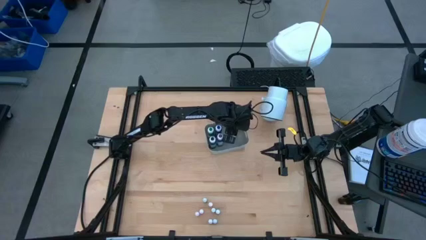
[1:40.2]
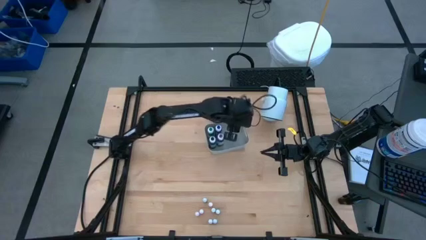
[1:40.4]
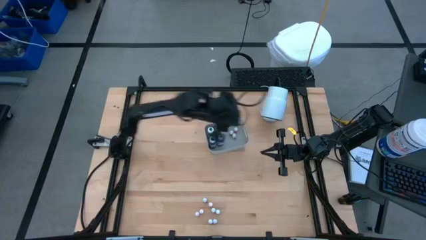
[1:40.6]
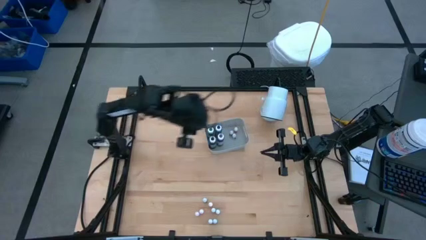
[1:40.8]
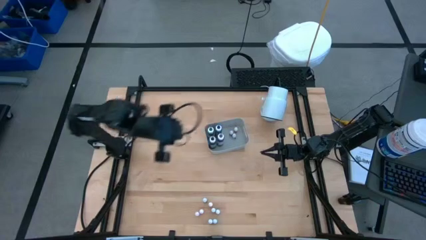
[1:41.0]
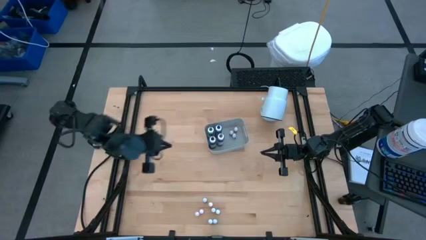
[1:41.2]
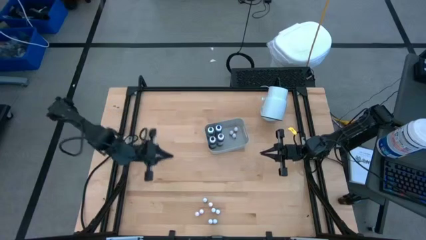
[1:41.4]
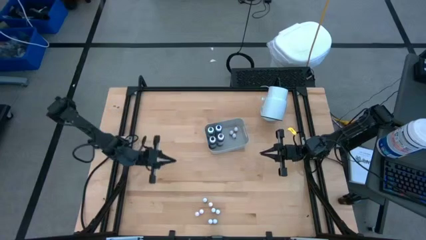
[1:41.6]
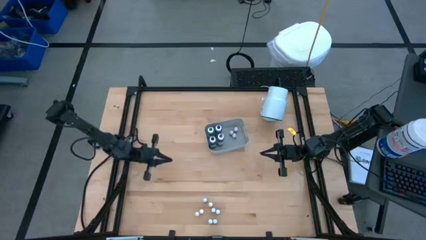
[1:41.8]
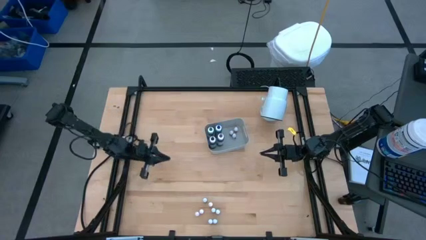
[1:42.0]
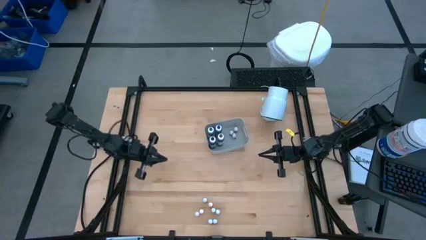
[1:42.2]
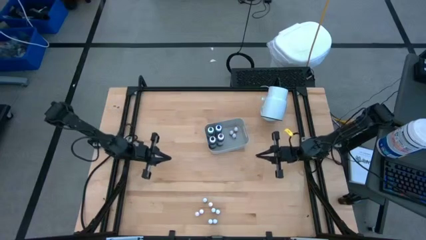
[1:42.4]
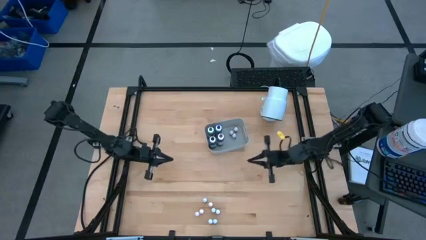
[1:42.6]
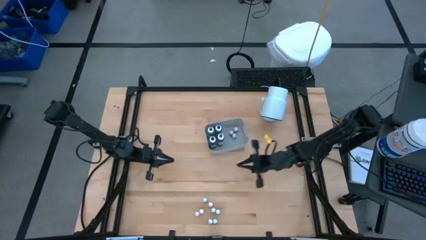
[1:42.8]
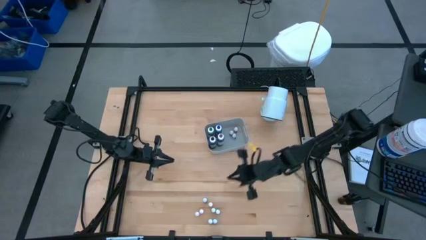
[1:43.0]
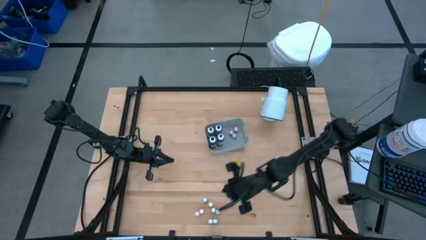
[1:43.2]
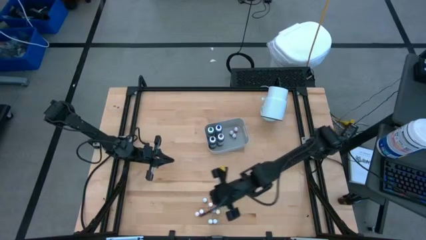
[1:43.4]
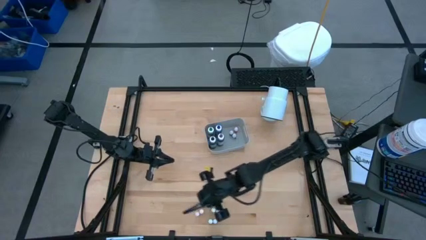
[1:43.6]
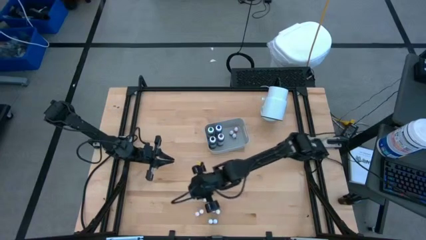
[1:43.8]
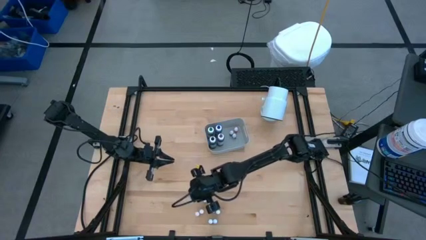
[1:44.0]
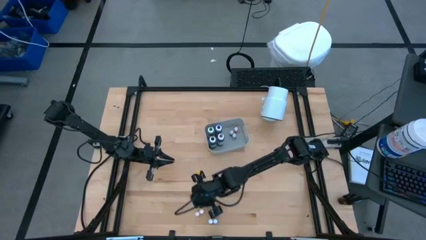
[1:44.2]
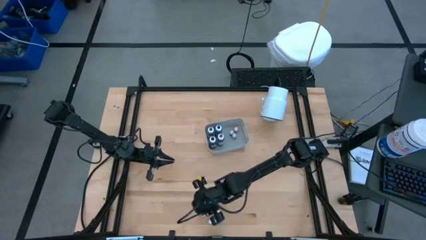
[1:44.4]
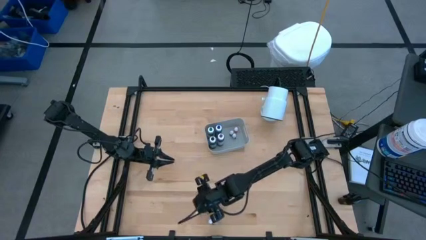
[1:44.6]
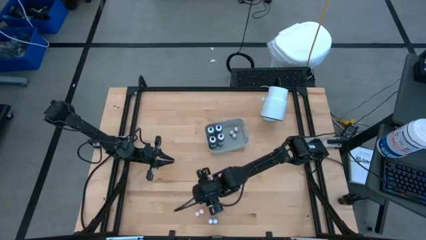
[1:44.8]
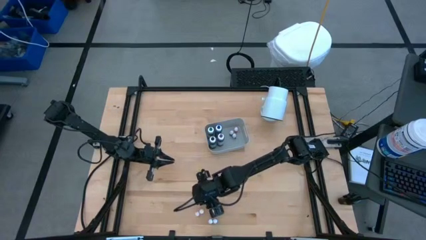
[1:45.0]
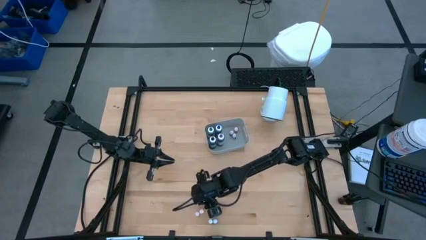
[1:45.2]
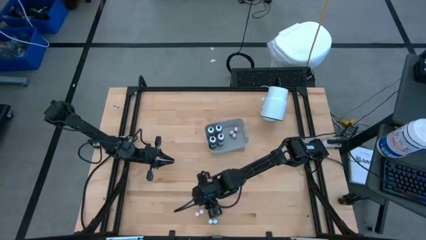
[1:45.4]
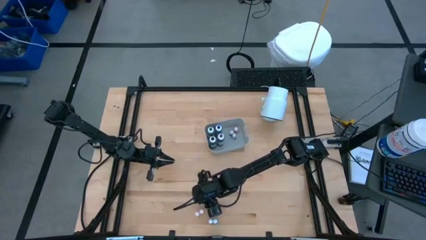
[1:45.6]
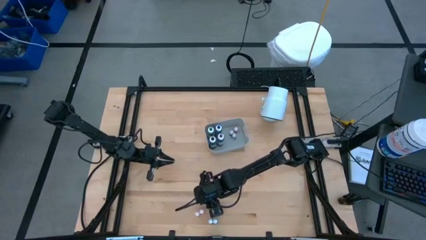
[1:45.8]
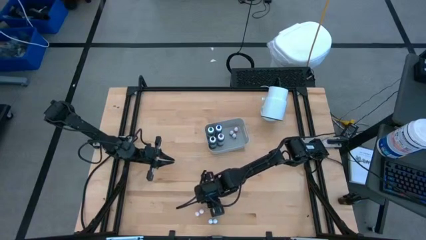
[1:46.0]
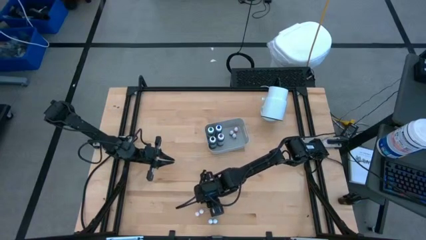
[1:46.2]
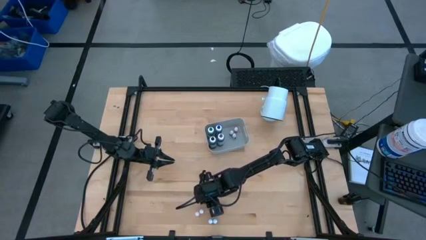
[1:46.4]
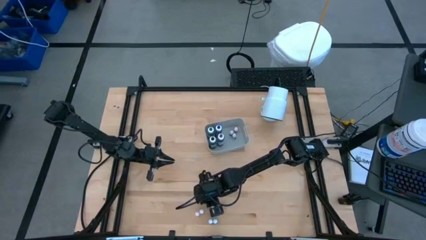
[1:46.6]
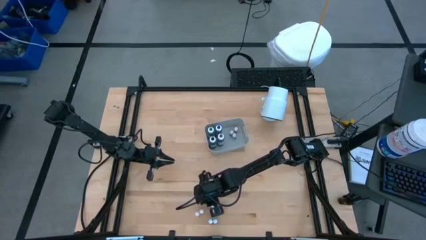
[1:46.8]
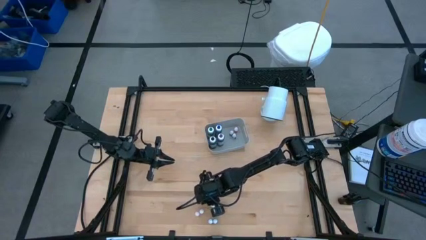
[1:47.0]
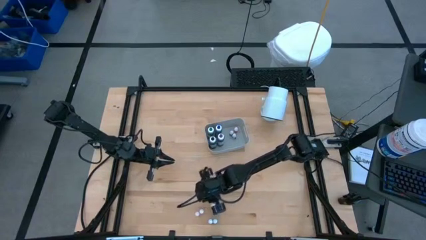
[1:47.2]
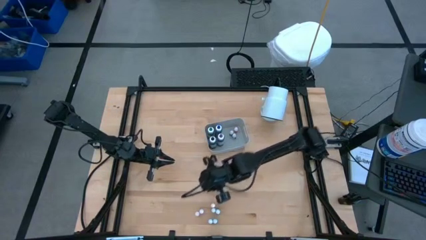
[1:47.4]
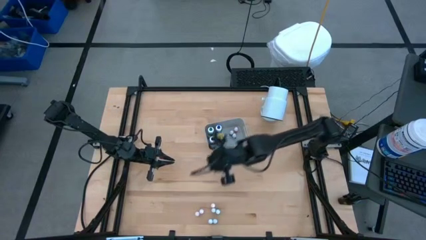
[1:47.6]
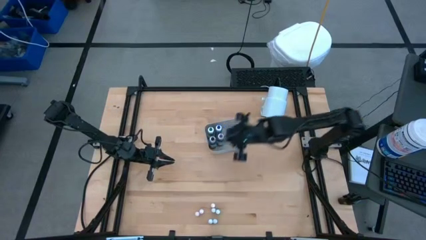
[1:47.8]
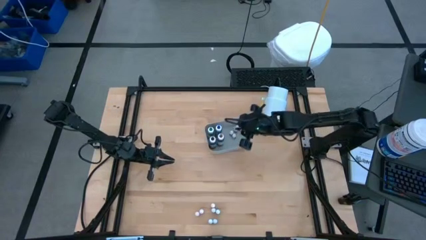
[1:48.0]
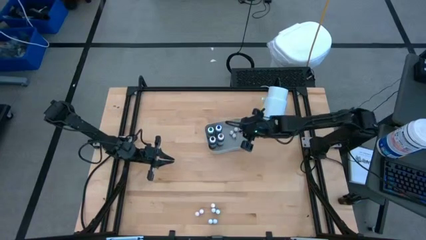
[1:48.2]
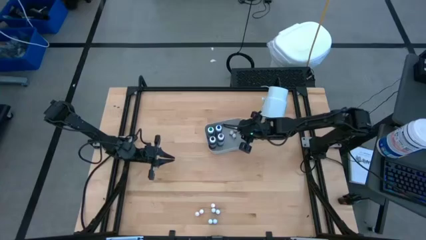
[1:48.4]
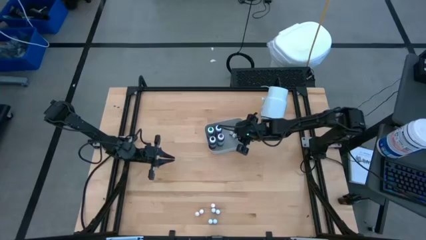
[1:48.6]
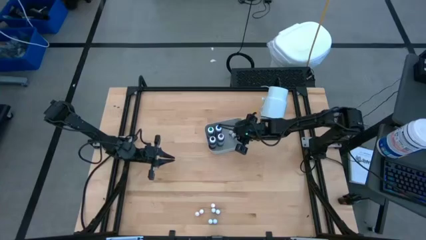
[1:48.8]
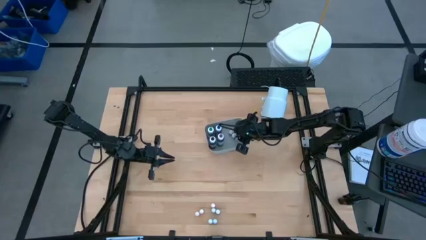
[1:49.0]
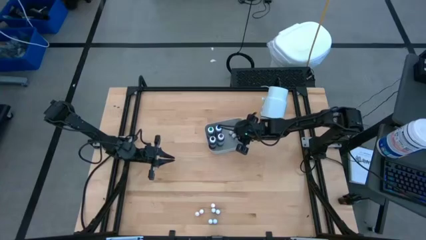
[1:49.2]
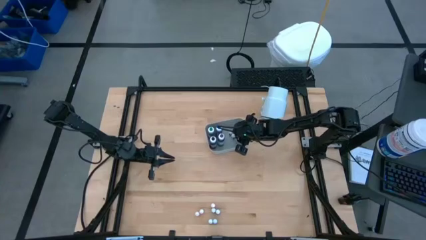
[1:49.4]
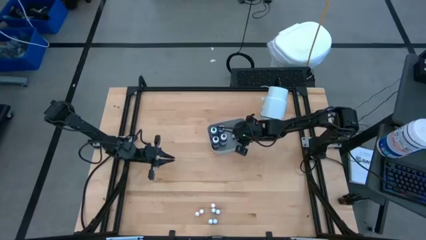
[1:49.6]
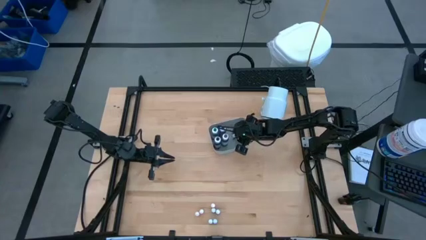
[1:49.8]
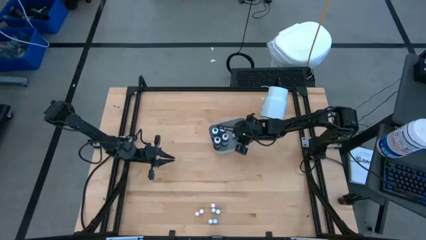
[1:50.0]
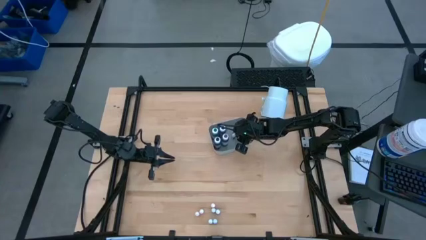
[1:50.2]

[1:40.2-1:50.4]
Task: Pick & Place food coloring
Put the small green food coloring bottle into the gray bin

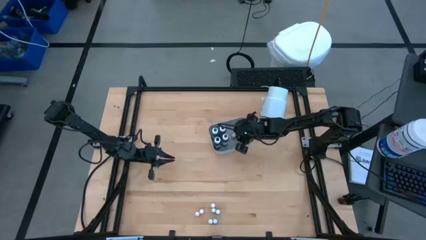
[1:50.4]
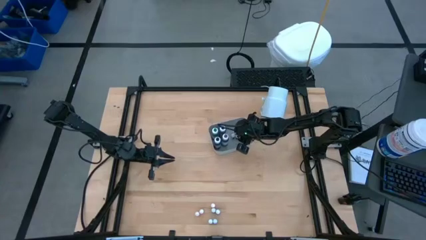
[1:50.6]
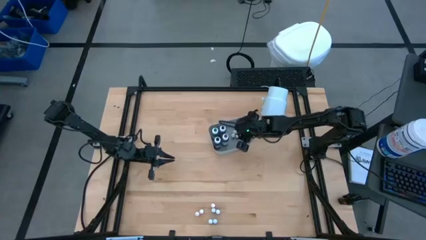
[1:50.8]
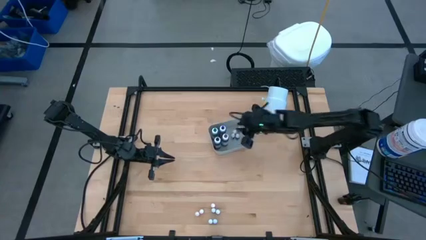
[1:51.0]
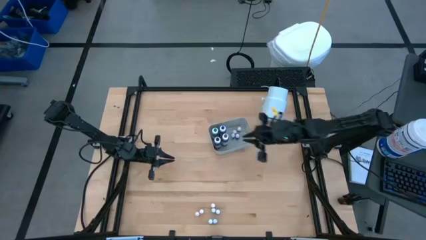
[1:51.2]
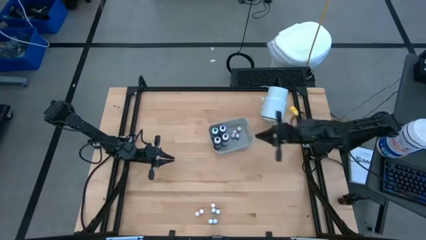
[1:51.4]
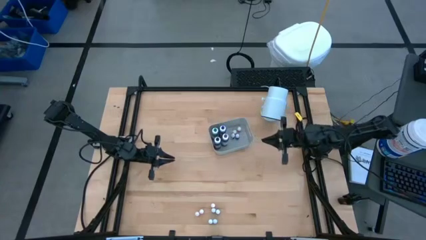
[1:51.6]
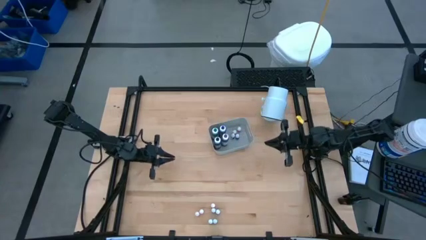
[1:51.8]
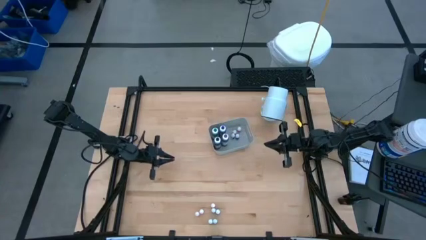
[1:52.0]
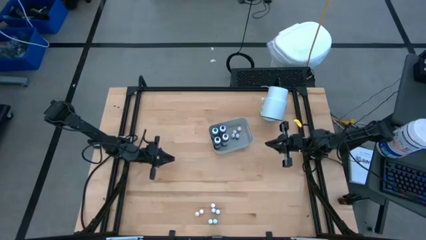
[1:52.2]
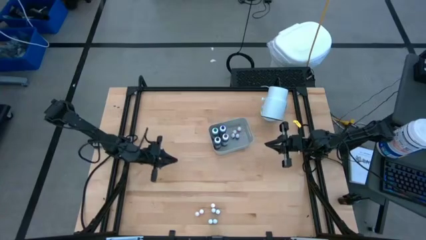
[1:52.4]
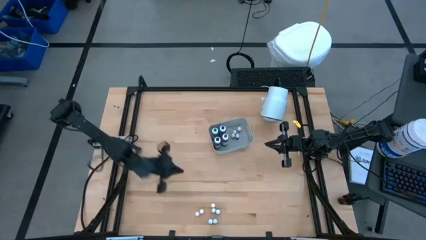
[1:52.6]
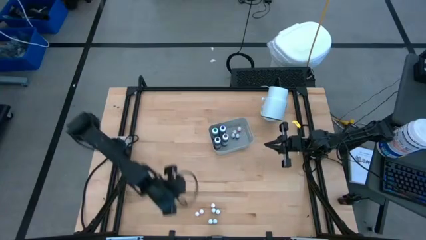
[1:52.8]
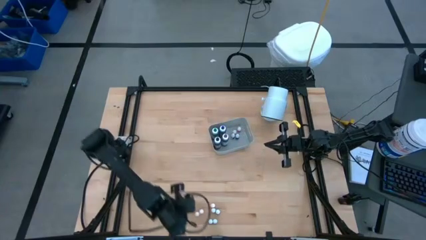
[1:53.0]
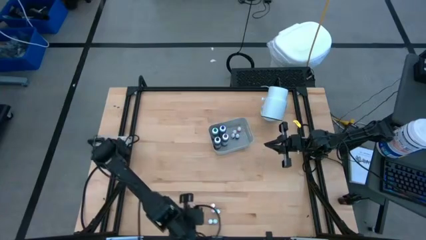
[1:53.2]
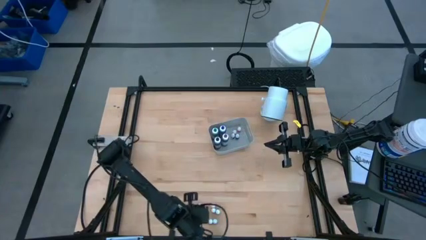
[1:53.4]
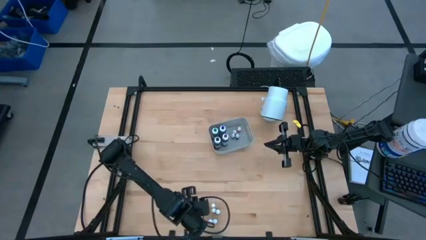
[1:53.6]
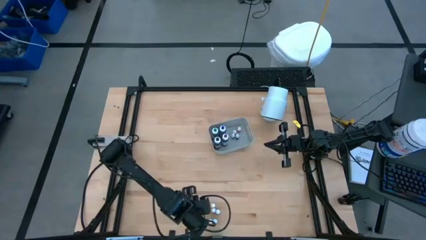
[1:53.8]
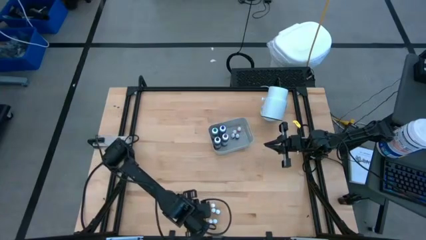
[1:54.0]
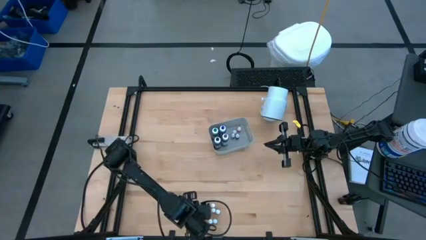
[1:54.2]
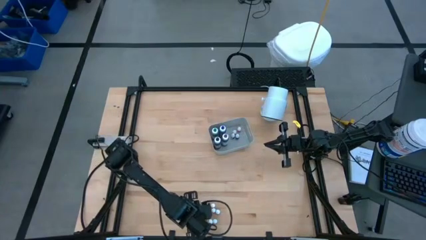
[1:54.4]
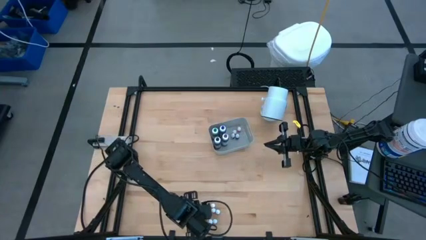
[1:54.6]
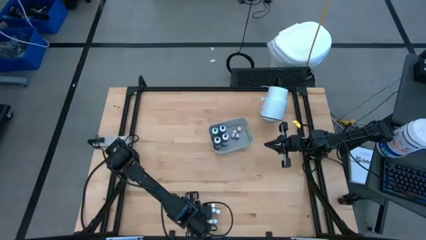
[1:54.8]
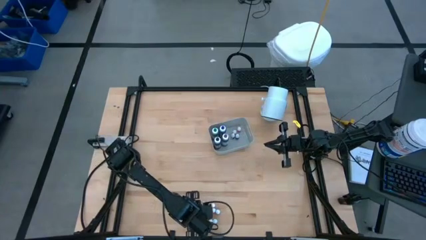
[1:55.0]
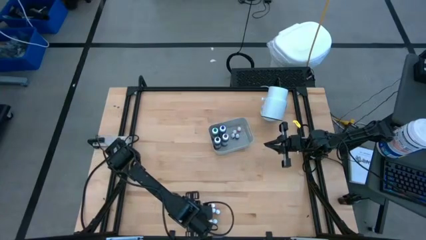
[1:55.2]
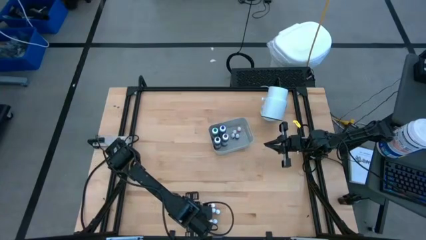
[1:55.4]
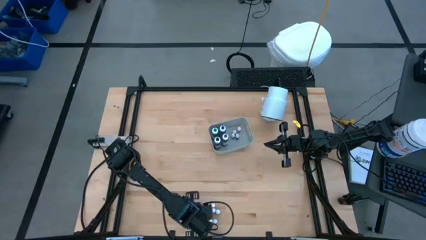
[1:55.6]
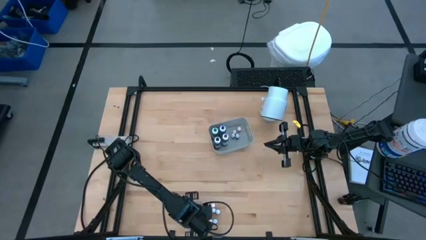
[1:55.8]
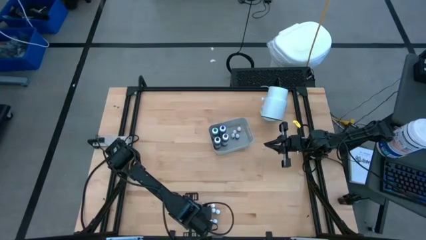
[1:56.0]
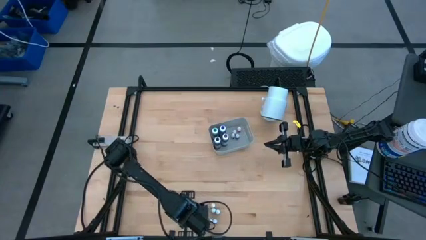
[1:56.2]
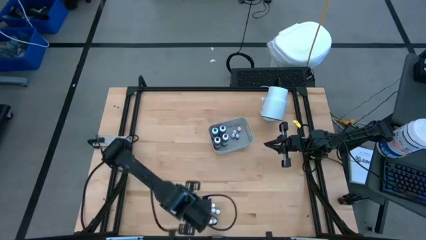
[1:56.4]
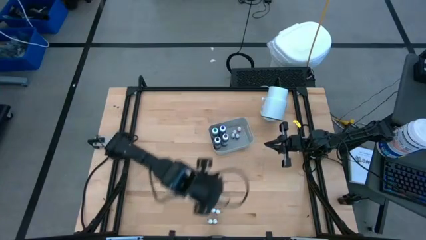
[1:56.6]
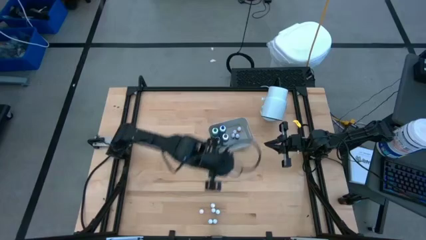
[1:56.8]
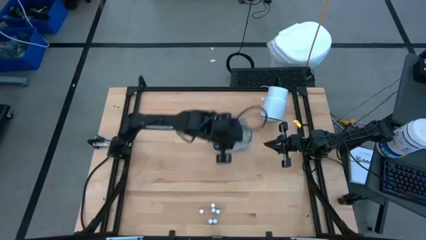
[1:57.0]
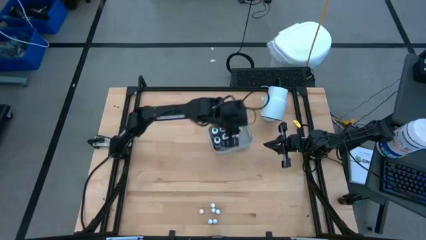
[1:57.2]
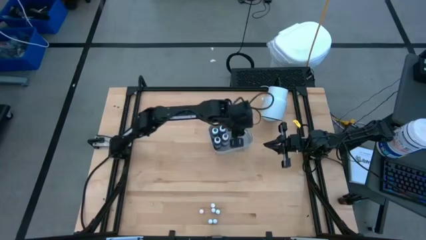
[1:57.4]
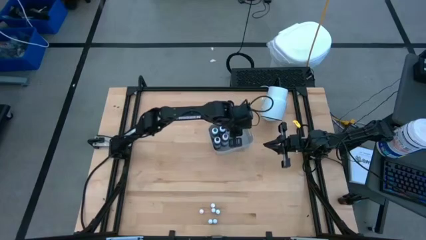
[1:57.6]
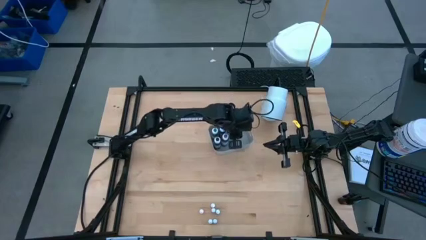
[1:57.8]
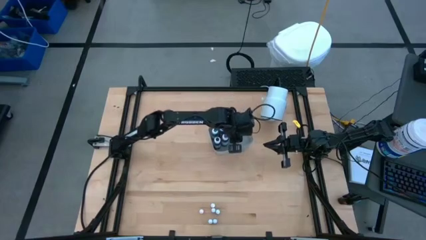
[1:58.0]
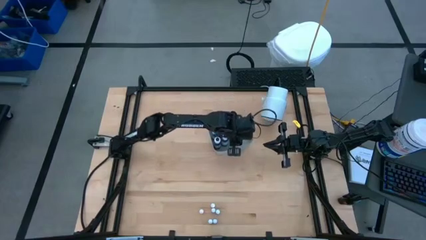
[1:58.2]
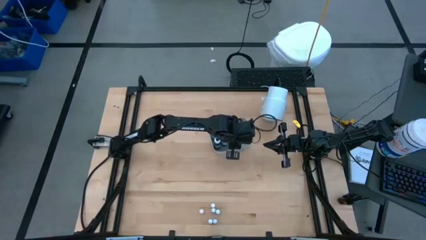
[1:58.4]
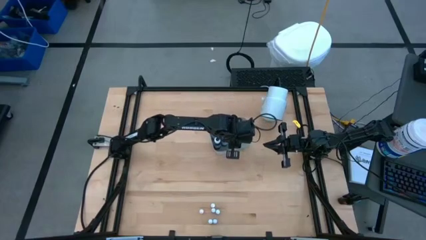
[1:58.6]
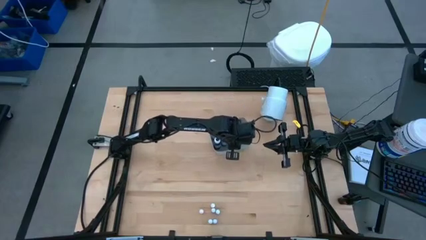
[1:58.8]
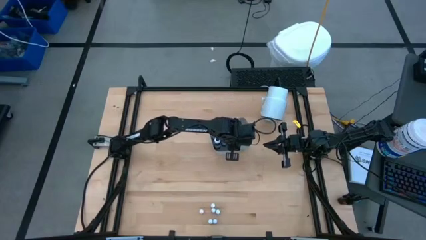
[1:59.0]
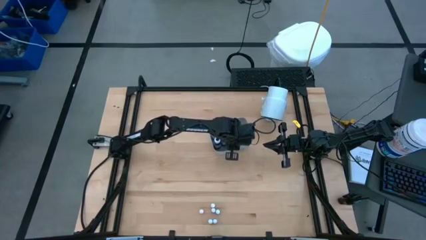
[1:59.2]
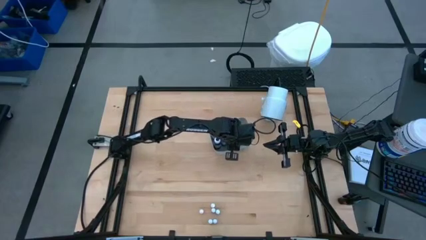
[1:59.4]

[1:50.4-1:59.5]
Put the small yellow food coloring bottle into the gray bin
